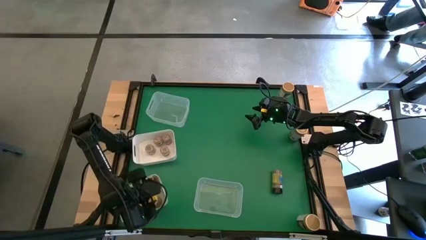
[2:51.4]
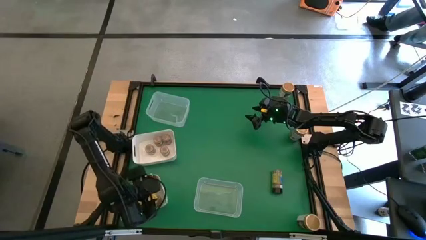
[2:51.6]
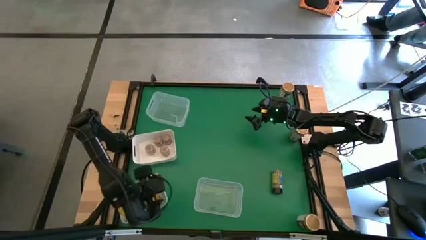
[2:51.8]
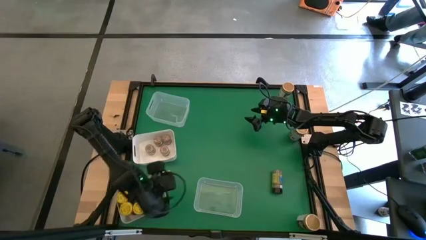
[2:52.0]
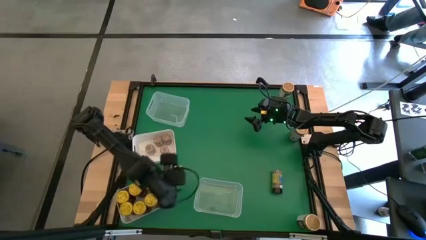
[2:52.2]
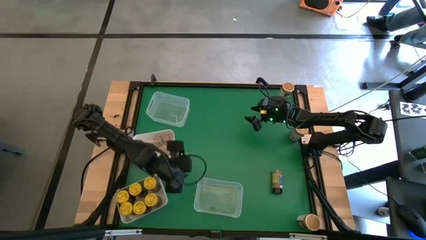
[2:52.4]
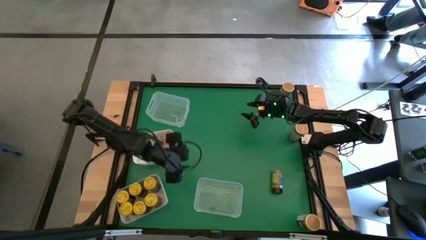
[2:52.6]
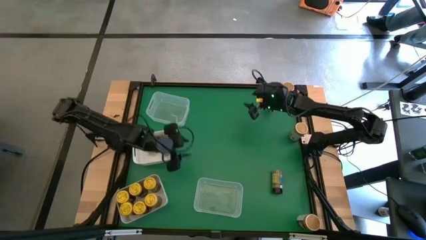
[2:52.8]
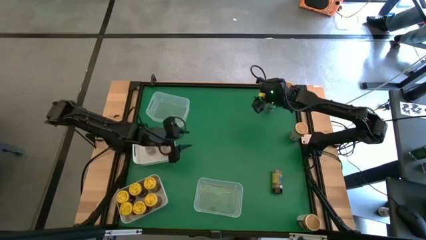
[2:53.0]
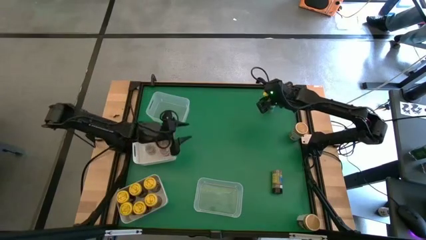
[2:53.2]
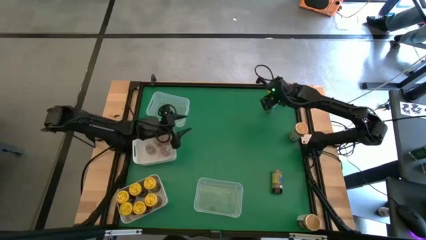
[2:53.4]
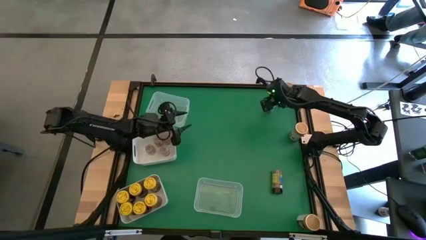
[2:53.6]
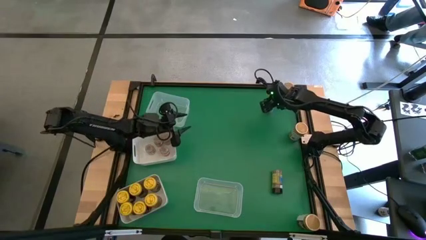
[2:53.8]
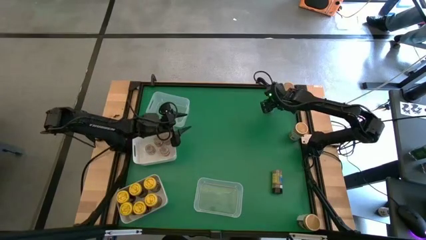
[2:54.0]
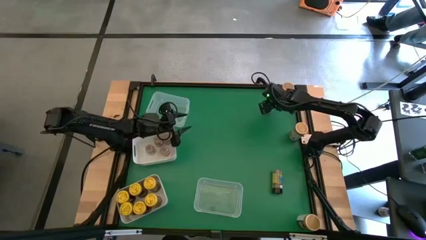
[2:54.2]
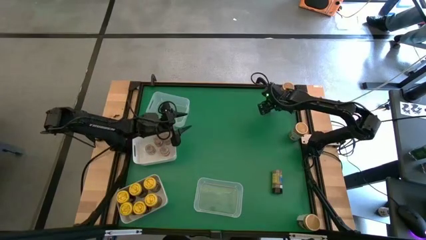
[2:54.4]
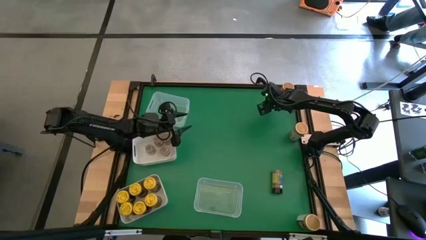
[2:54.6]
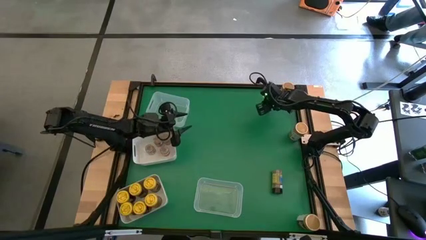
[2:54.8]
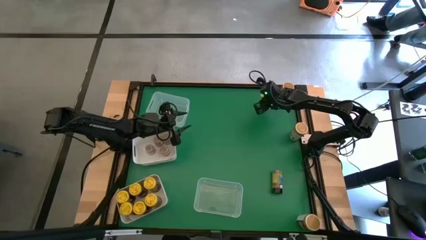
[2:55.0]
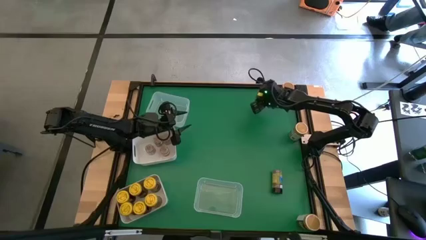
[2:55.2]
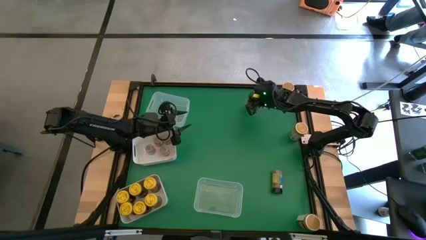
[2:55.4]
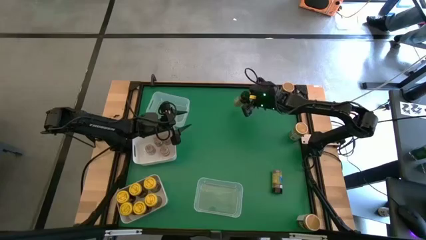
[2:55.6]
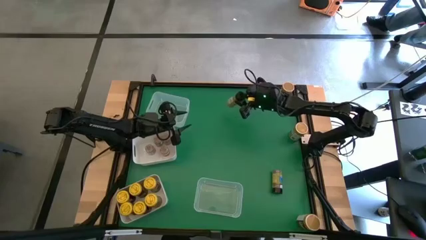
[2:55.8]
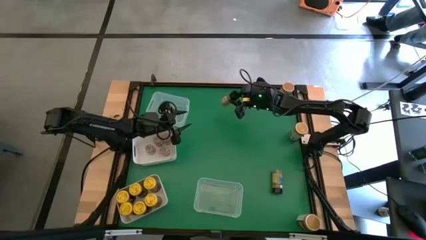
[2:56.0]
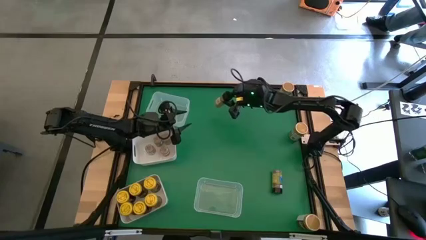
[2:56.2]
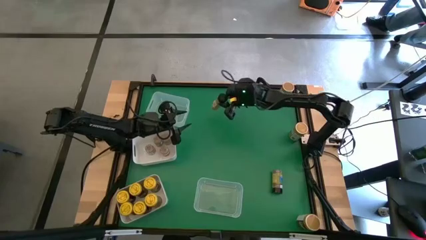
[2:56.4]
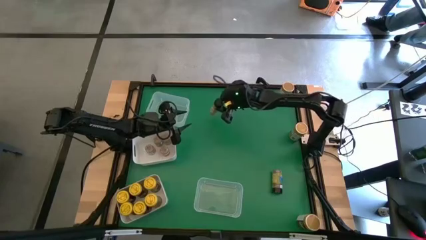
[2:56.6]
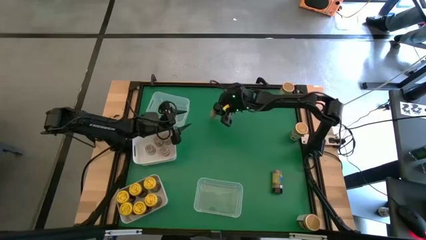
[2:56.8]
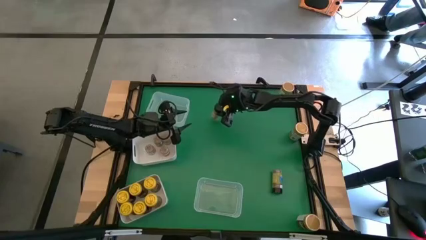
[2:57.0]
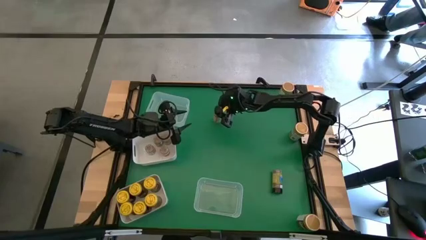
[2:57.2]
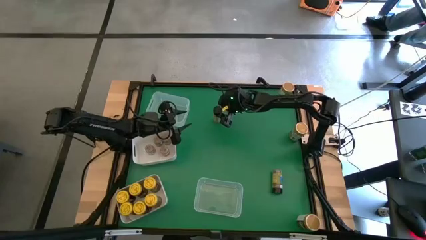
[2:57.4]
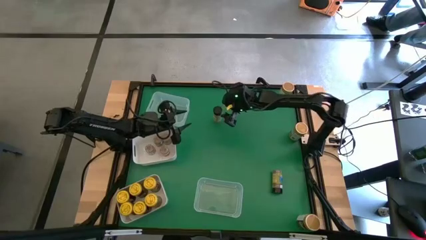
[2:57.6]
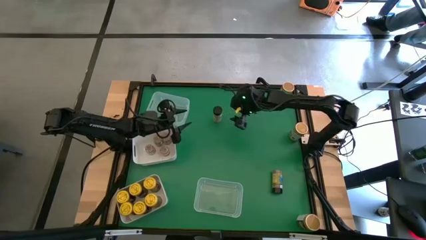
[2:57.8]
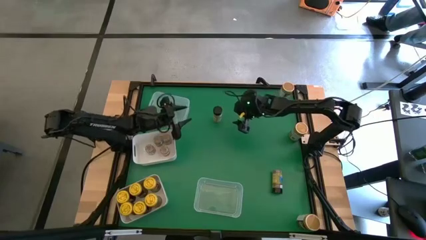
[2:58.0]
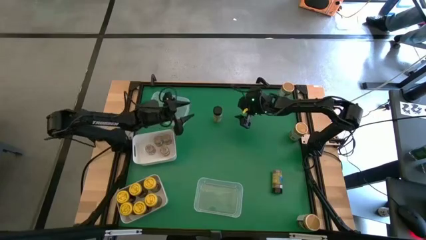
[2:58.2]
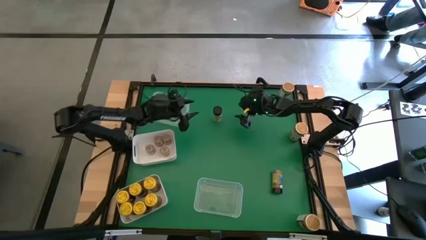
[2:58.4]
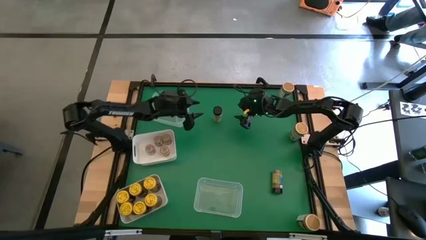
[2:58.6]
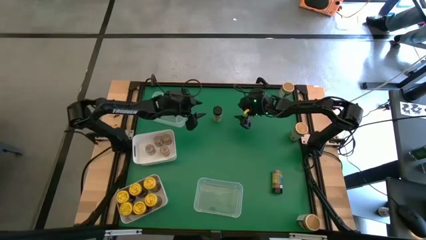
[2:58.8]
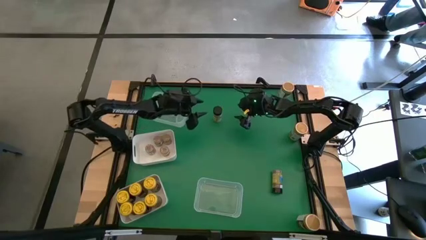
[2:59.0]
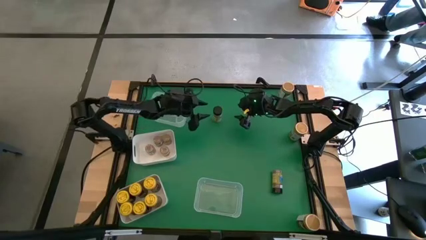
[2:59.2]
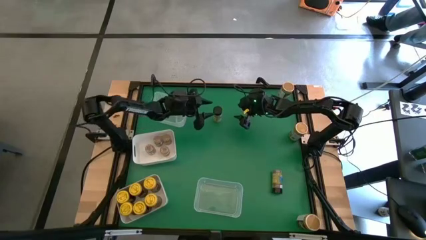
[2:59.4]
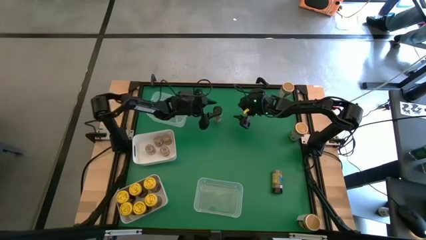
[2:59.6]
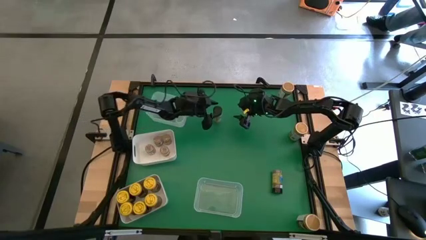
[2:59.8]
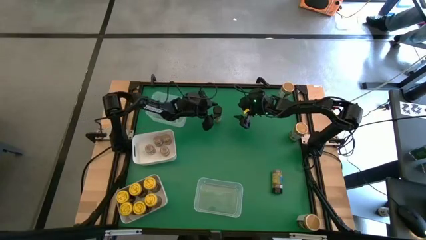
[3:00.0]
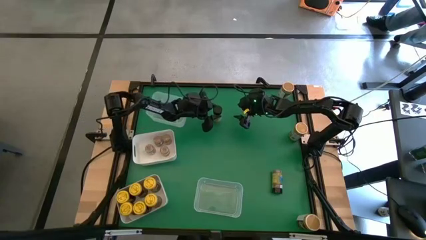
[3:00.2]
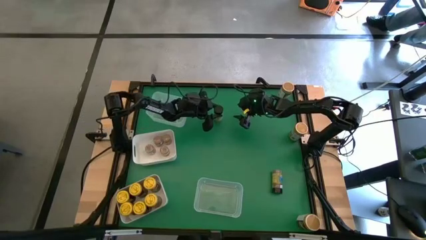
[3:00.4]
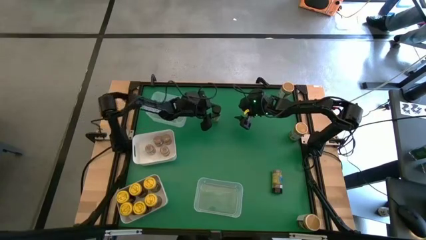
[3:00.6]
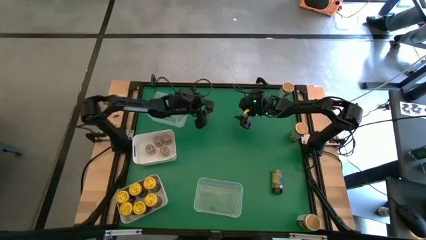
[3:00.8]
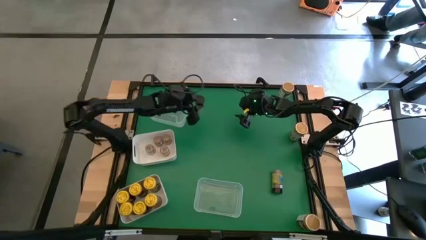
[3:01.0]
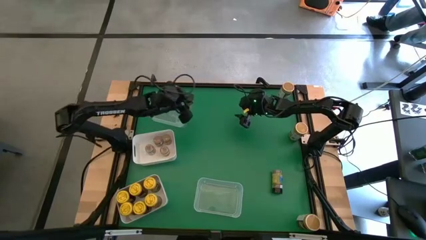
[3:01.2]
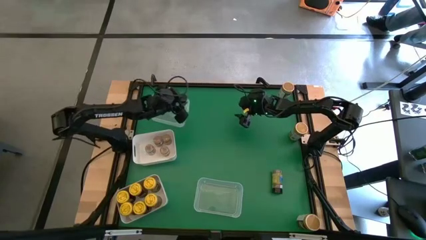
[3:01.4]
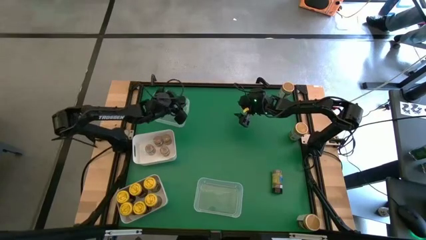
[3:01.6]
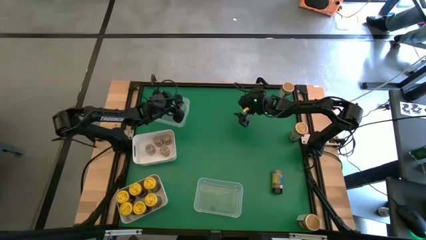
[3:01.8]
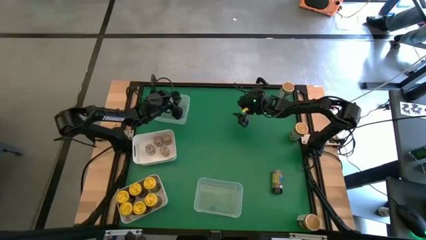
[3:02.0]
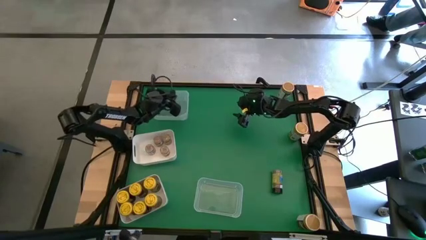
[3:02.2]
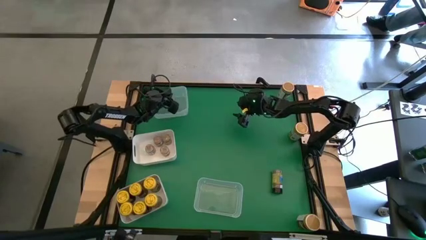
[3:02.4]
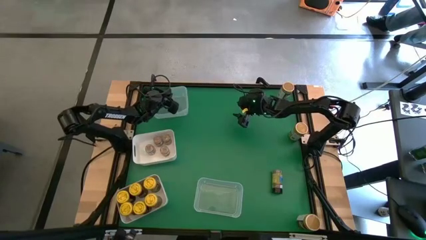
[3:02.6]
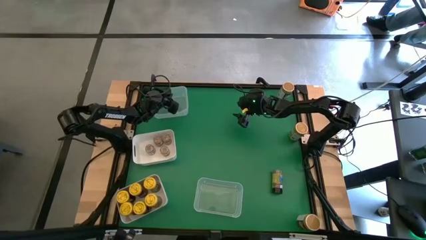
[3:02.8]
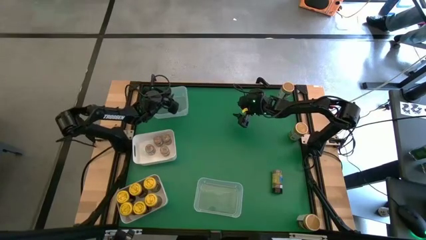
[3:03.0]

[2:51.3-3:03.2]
Task: Sort spices by type
Put the black spice bottle into the top transparent bin

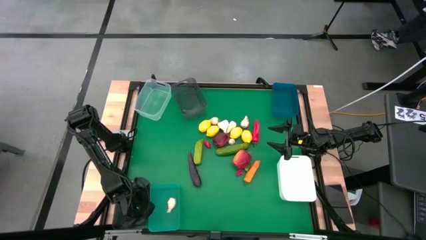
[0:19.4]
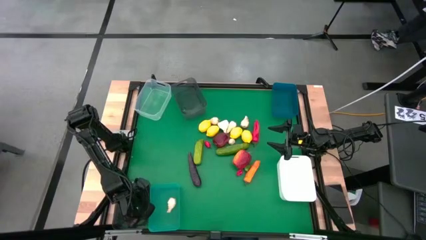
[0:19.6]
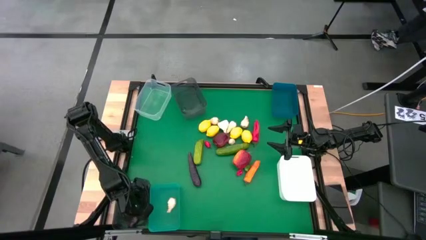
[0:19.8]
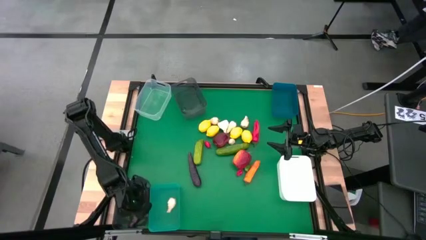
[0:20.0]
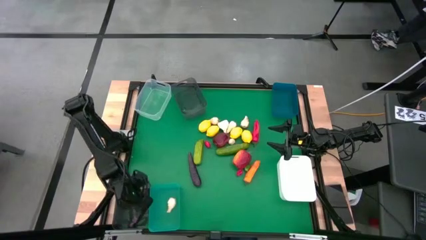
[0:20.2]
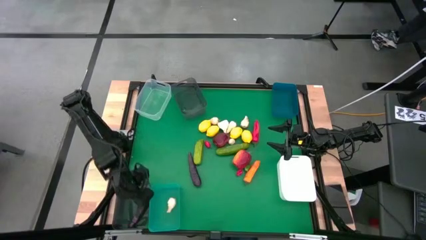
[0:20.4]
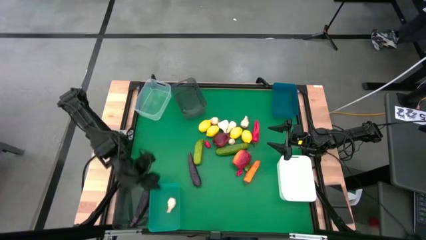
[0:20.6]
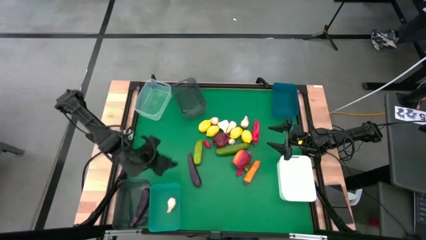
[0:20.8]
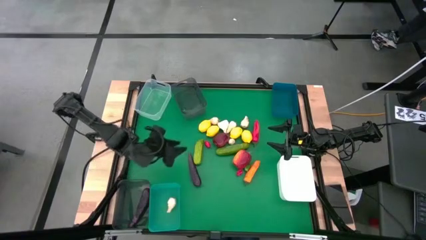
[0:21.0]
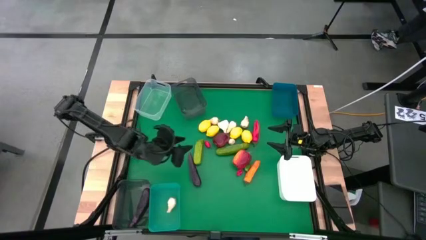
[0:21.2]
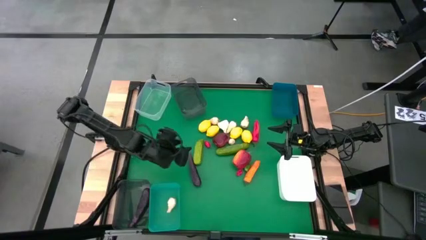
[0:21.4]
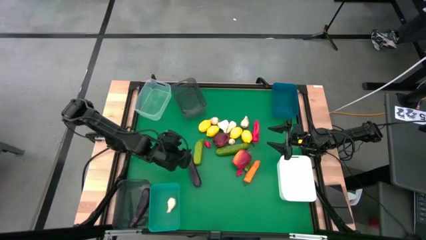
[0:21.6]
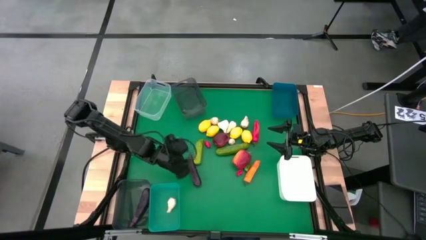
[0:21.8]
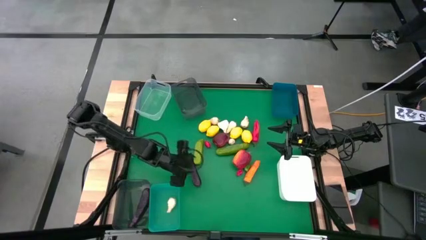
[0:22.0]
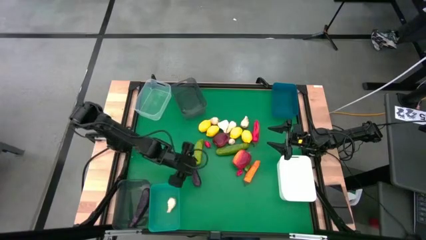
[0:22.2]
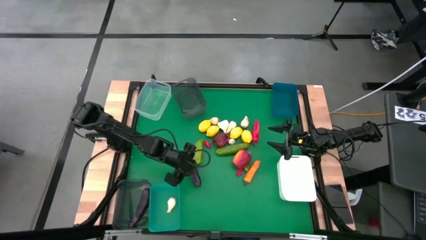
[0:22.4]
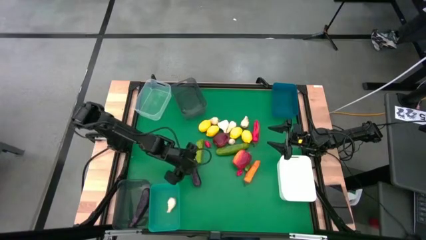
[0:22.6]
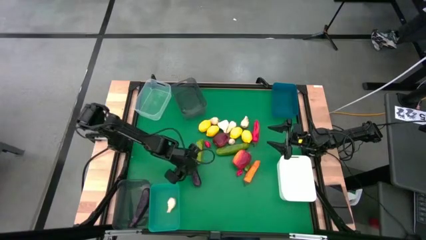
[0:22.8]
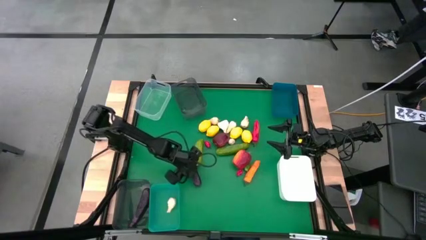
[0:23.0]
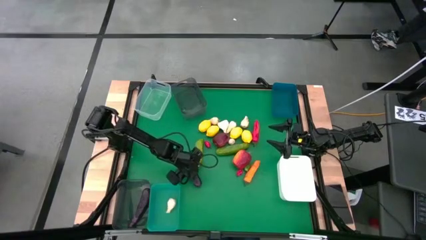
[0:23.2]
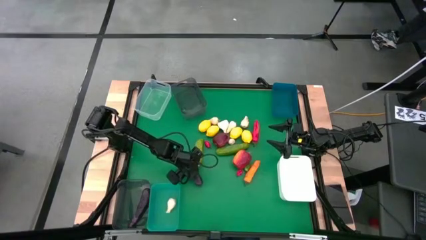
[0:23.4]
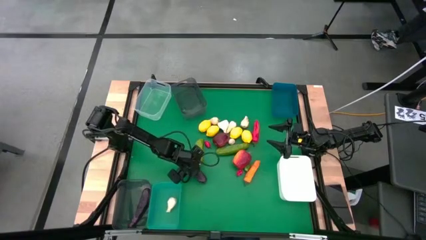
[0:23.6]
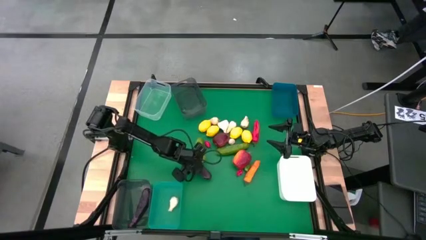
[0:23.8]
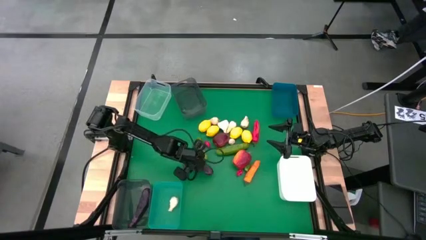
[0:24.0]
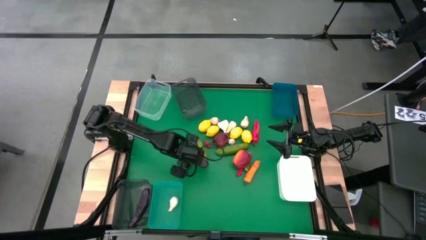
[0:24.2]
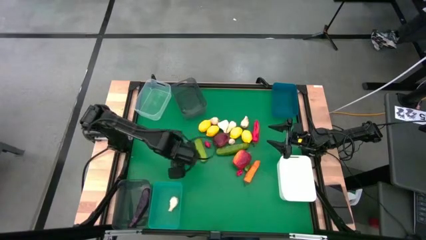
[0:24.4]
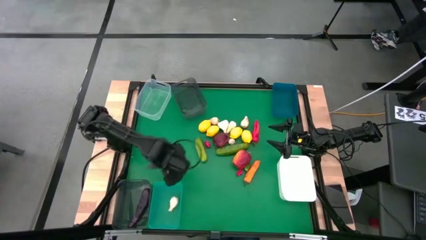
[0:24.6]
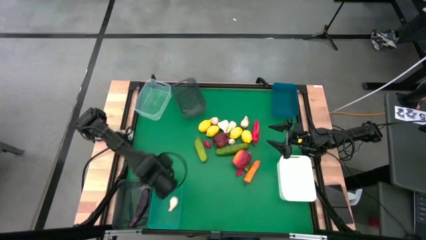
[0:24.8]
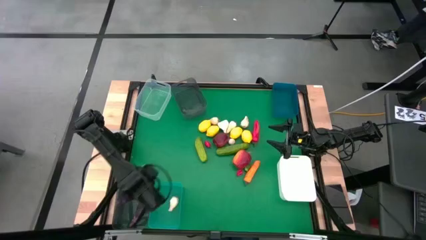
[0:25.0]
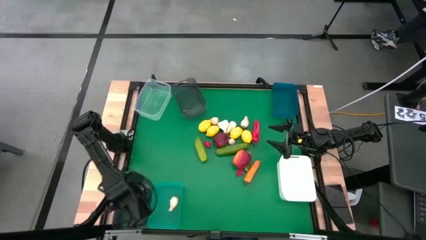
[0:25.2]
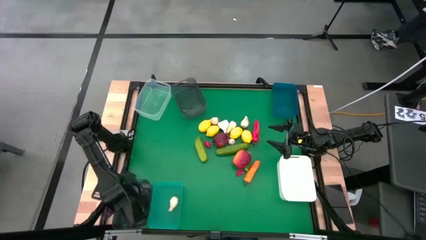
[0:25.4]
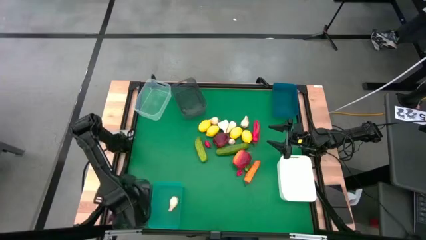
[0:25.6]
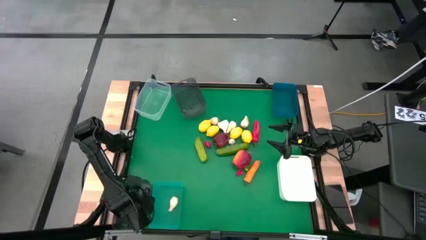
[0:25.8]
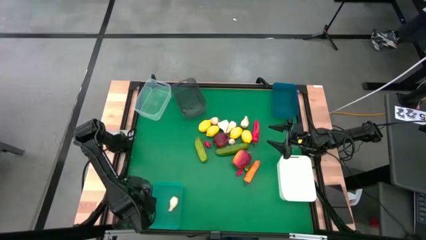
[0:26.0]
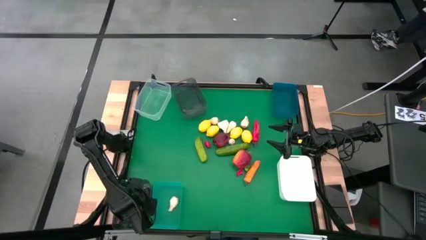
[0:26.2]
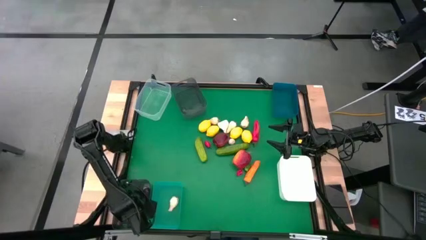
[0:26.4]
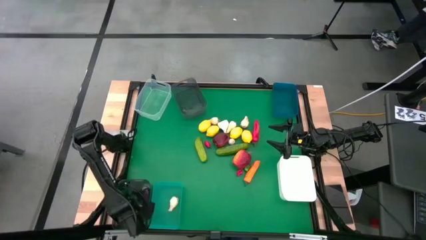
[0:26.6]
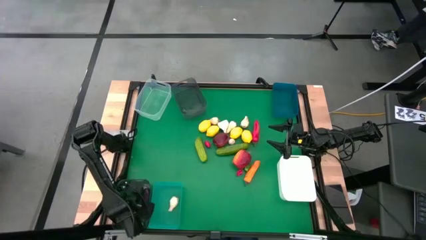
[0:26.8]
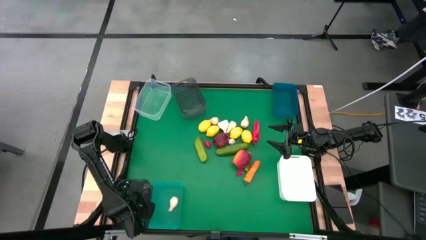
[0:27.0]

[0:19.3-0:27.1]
Task: Sort produce into baskets
Put the eggplant into the bottom black bin
